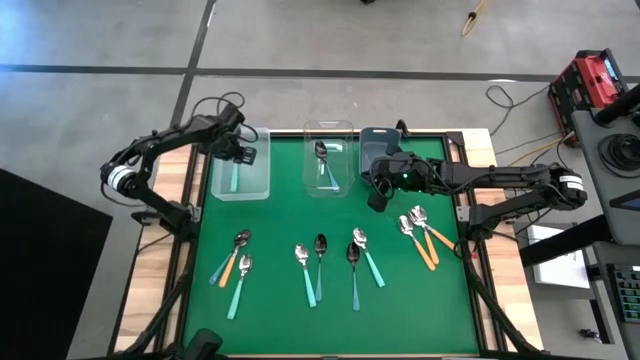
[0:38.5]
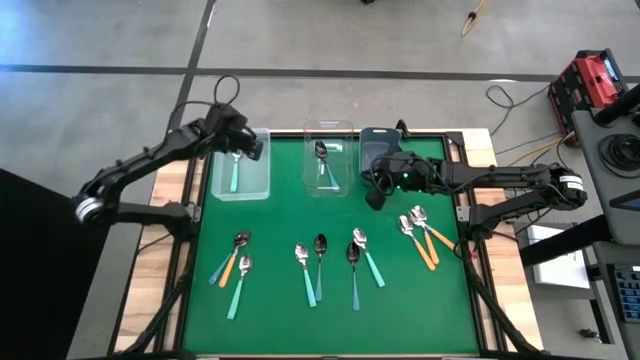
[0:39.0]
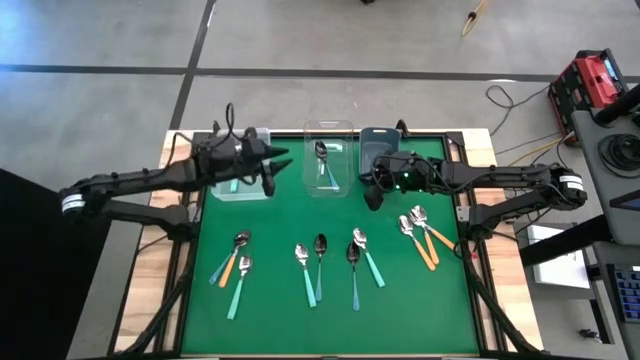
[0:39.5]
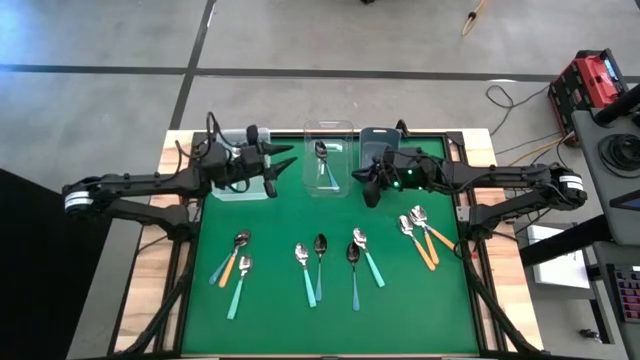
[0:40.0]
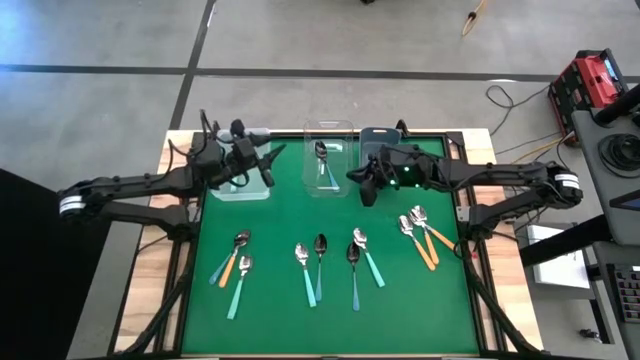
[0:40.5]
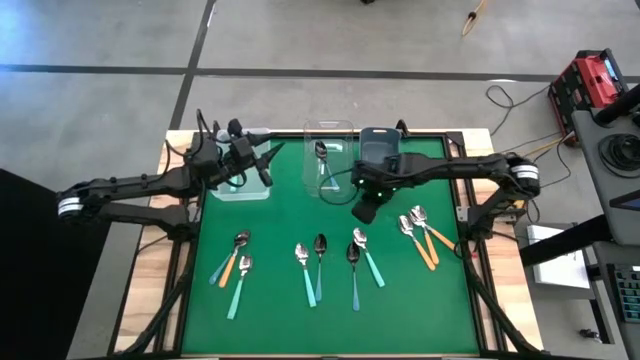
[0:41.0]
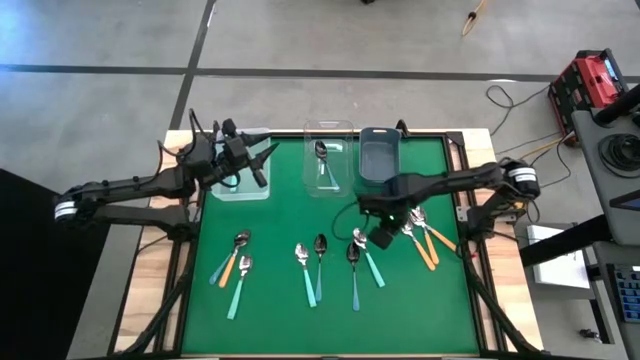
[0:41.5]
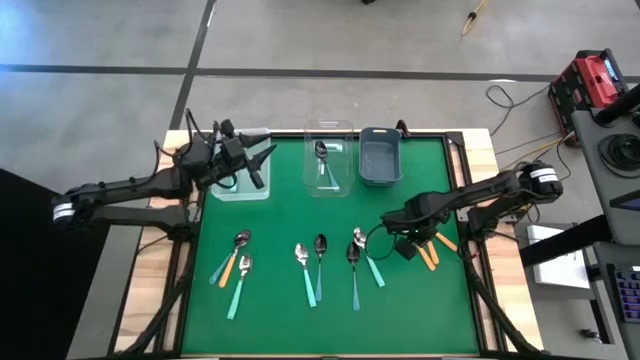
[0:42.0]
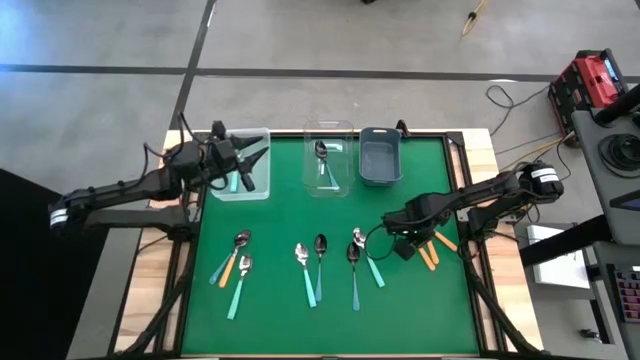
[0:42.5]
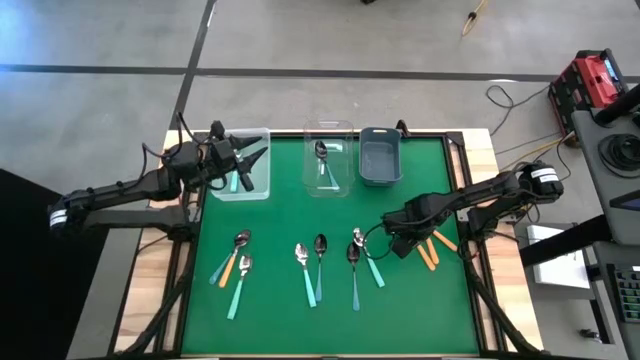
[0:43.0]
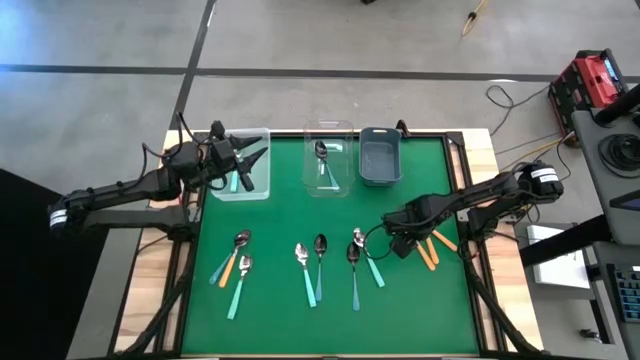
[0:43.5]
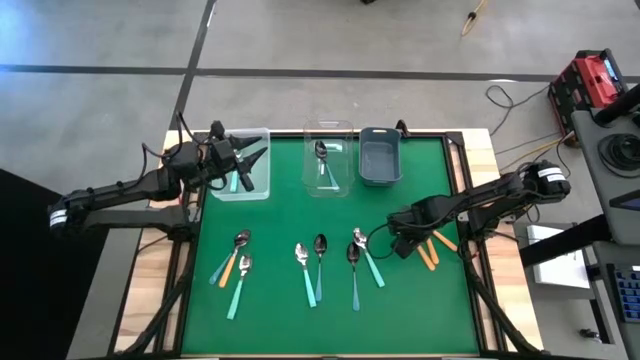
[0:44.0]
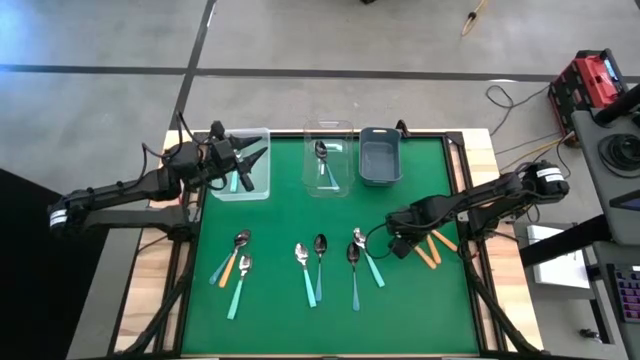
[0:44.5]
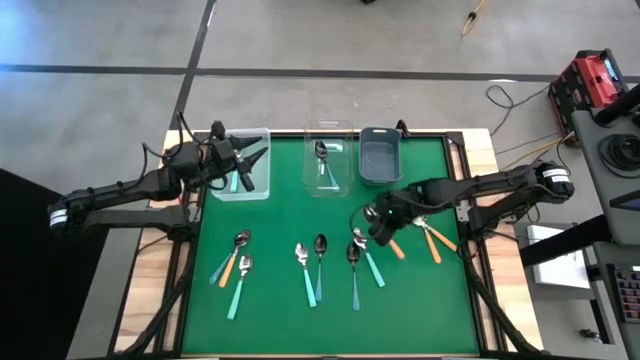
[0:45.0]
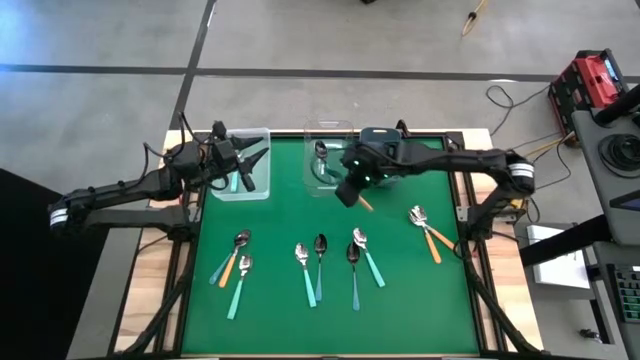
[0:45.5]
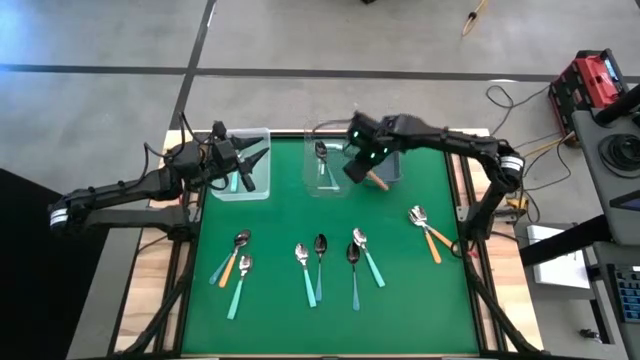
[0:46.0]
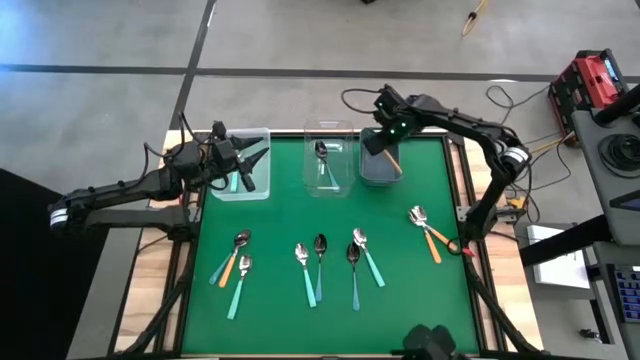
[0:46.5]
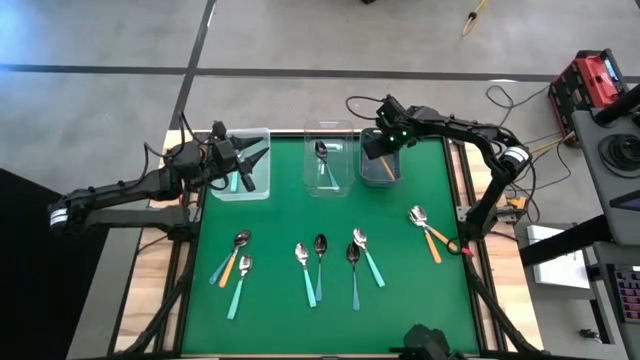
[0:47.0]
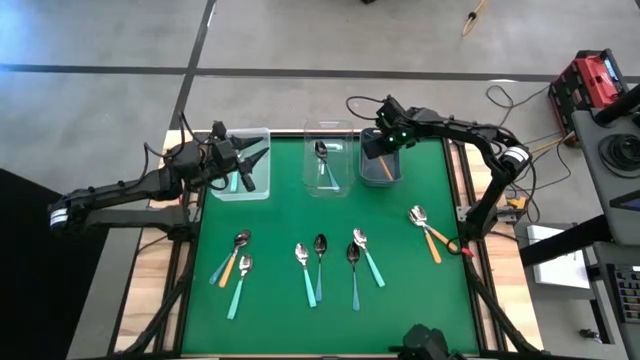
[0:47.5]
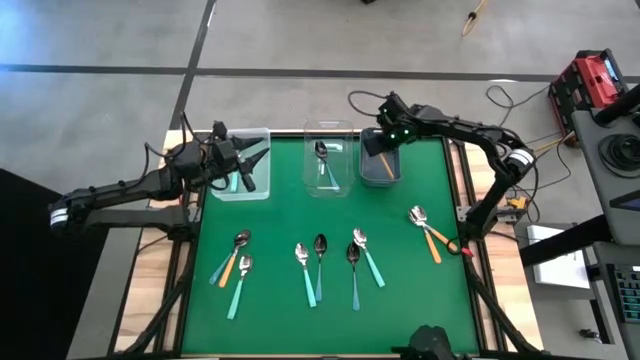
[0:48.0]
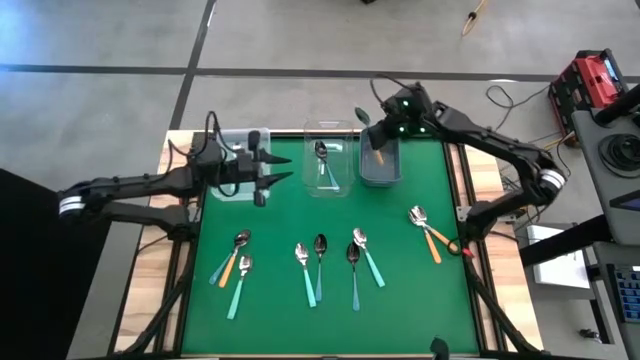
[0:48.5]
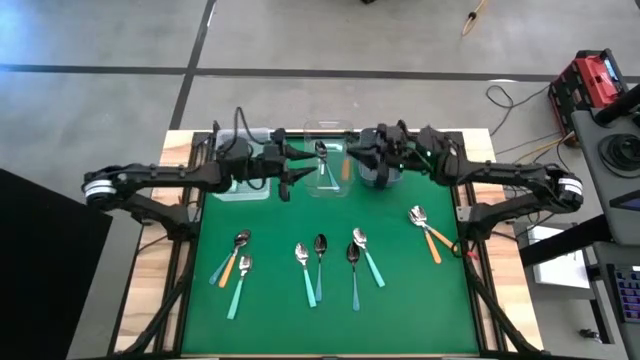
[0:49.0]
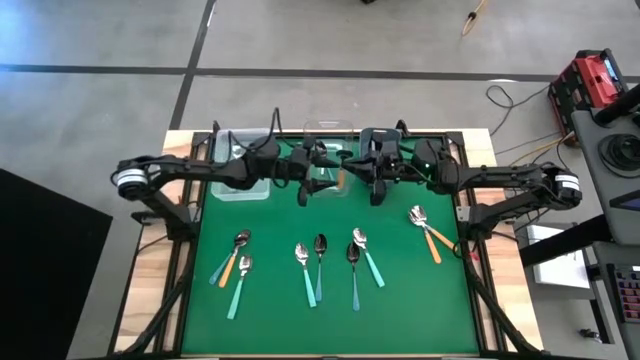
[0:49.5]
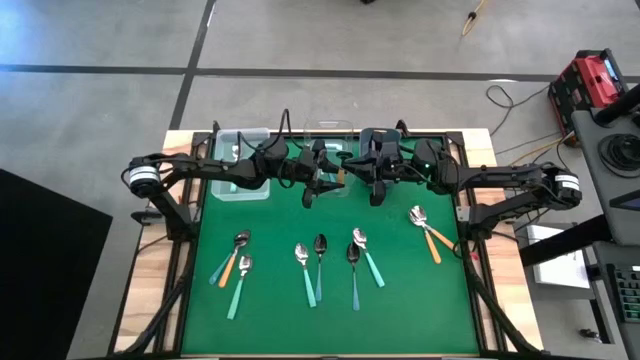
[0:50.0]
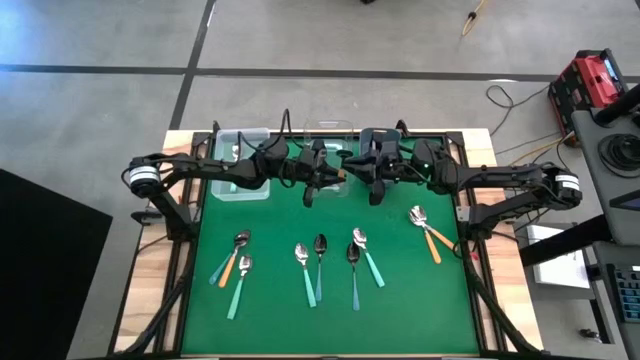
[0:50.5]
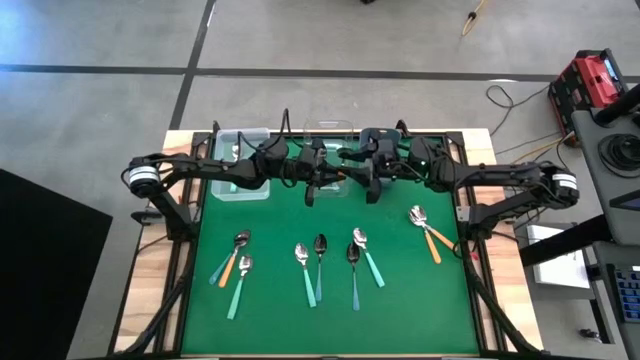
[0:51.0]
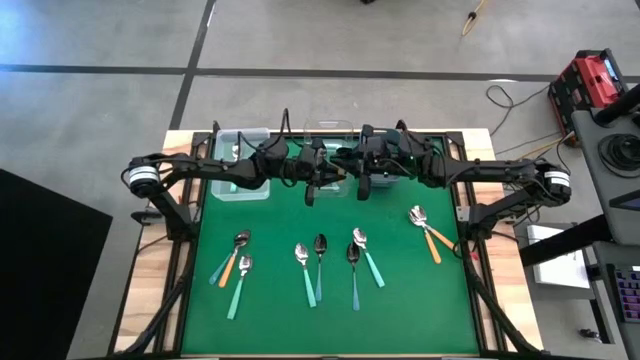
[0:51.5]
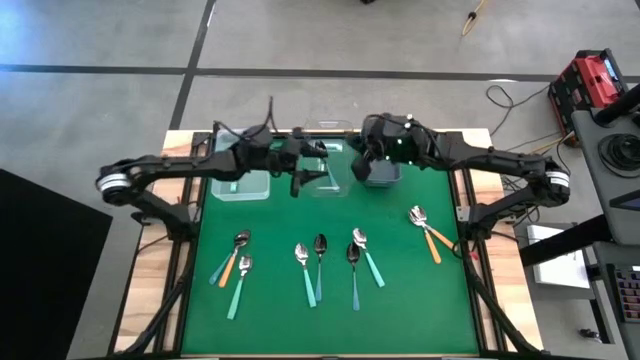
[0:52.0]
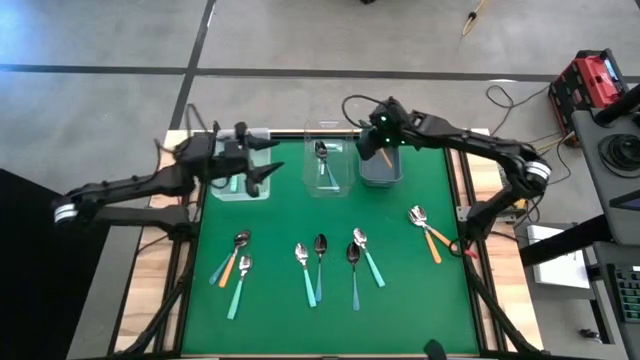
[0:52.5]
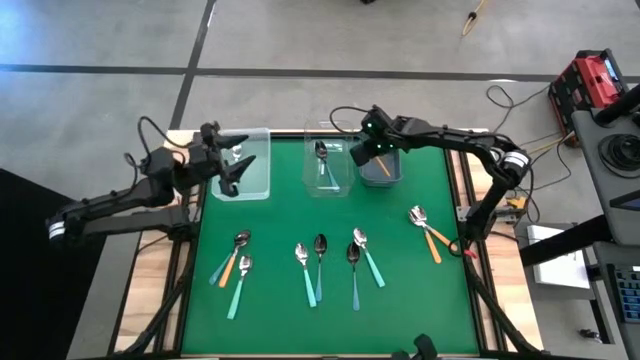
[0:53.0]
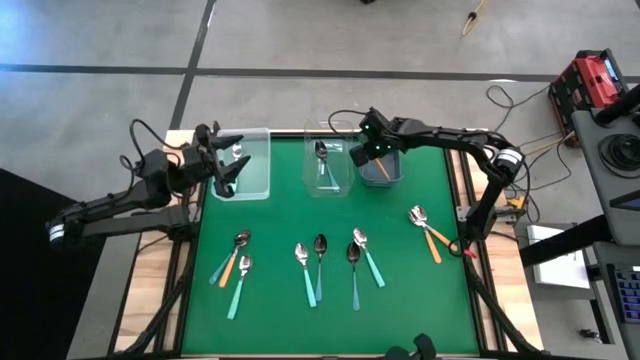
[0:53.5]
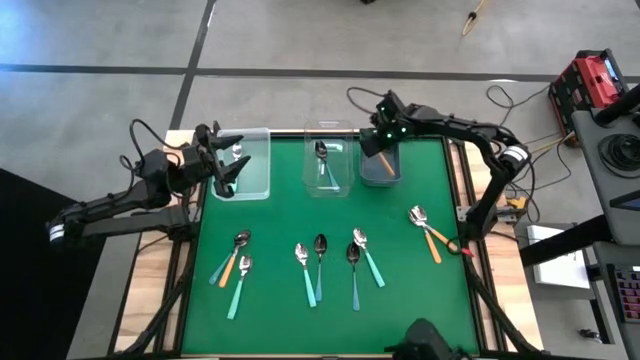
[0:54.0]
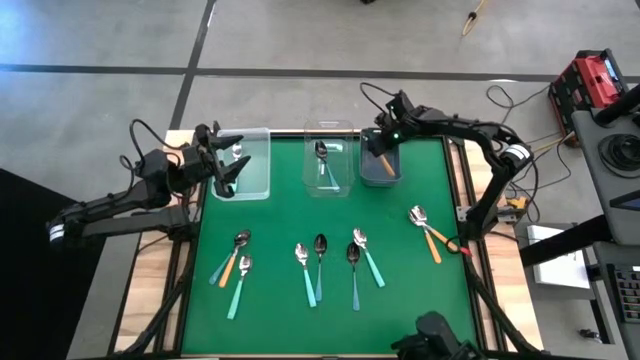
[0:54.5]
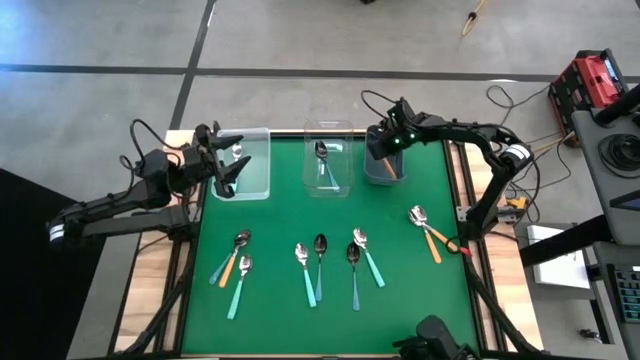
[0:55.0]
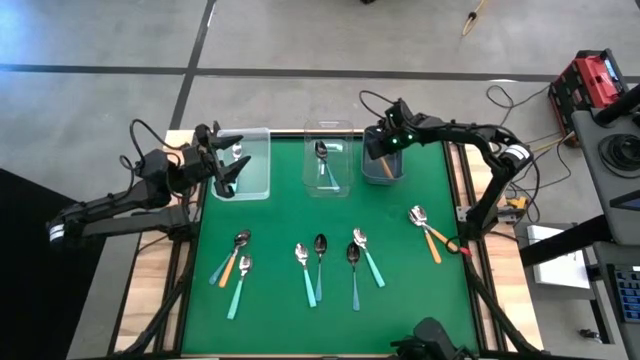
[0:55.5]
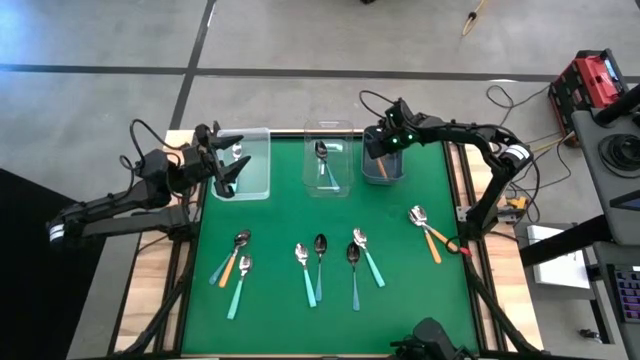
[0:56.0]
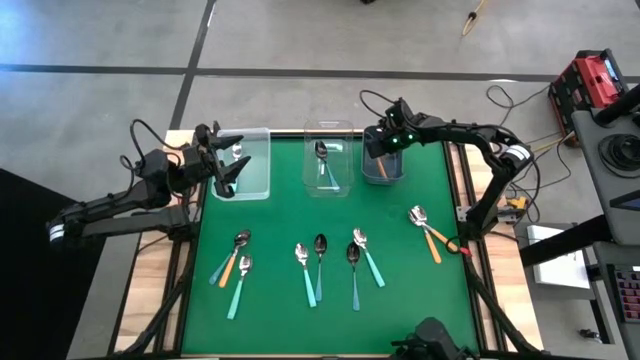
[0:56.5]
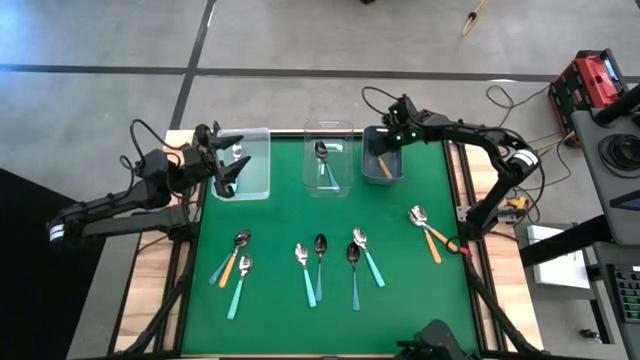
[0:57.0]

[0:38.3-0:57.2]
Task: Sort silverware by color (type)
Put the yellow spoon into the blue bin
